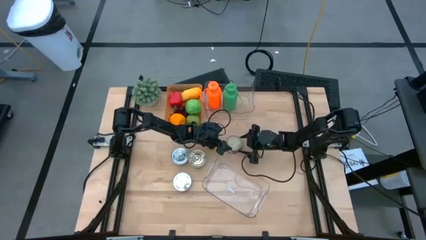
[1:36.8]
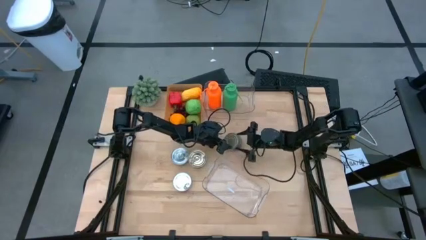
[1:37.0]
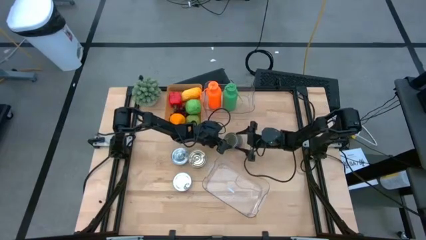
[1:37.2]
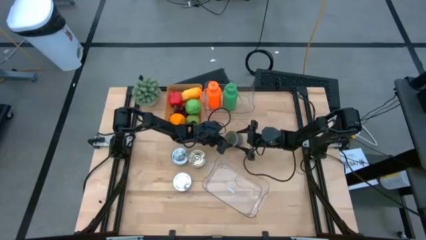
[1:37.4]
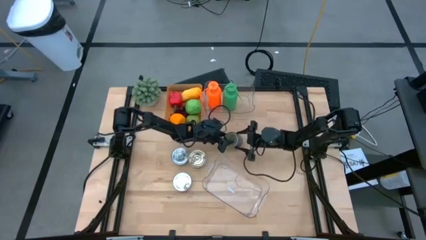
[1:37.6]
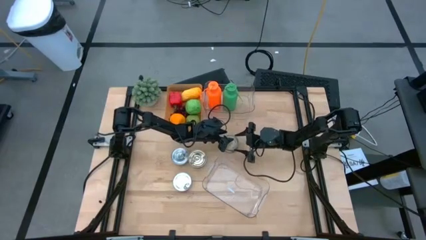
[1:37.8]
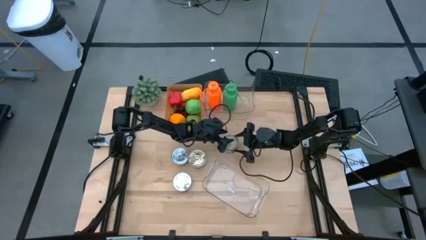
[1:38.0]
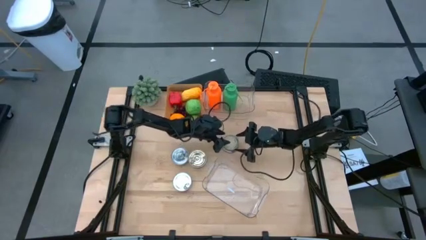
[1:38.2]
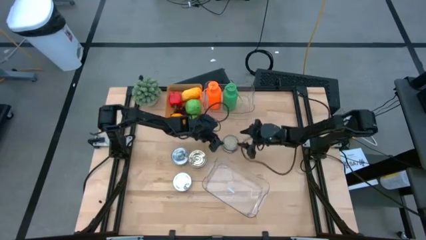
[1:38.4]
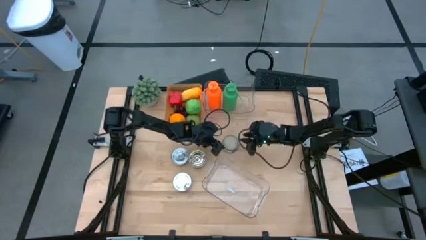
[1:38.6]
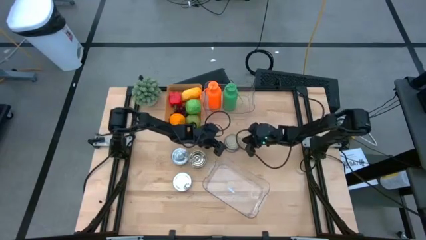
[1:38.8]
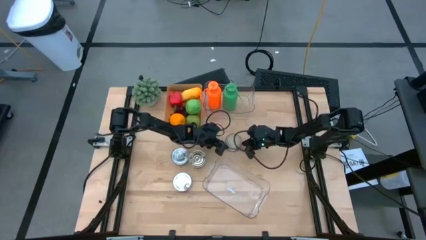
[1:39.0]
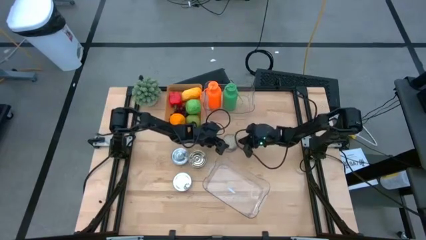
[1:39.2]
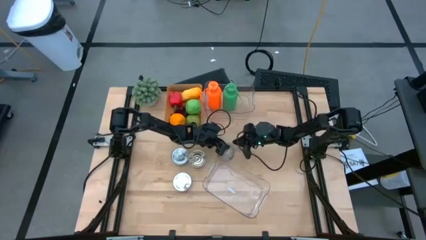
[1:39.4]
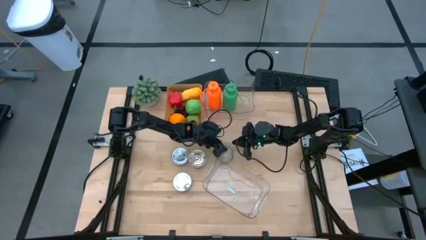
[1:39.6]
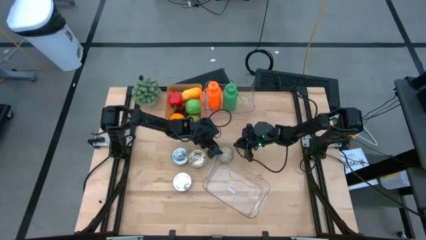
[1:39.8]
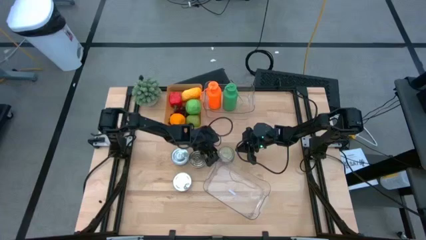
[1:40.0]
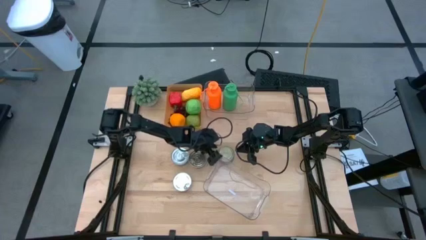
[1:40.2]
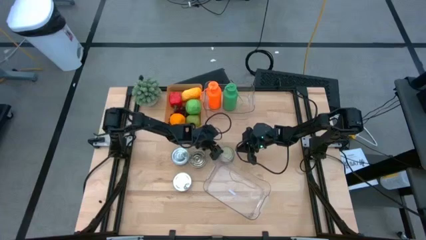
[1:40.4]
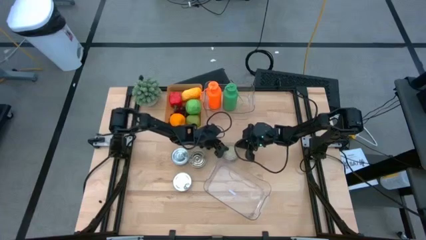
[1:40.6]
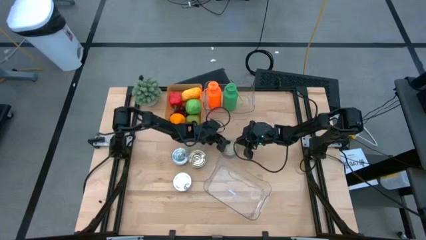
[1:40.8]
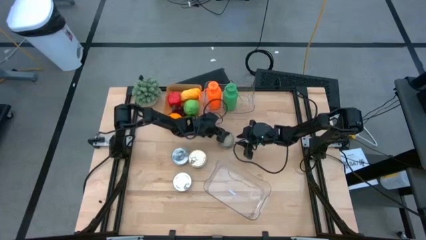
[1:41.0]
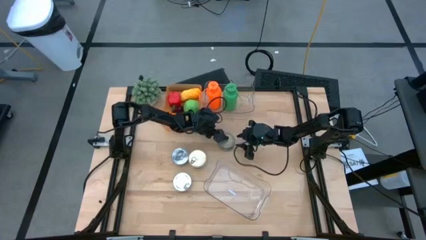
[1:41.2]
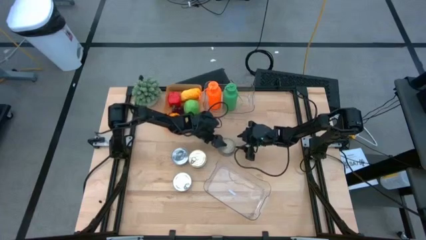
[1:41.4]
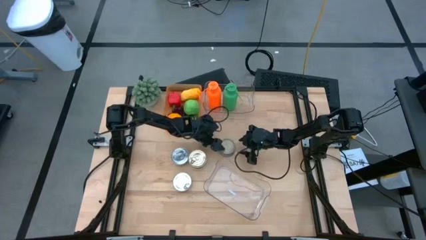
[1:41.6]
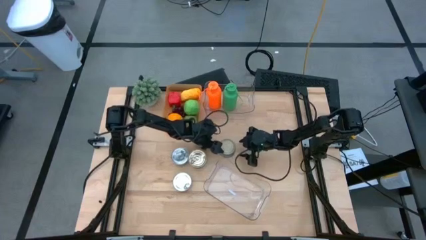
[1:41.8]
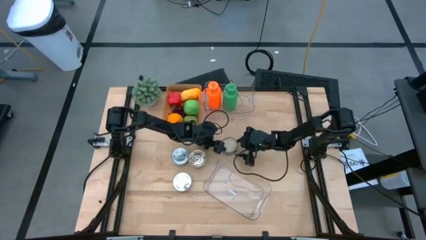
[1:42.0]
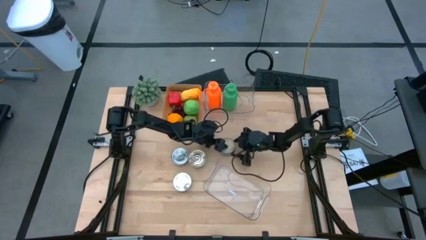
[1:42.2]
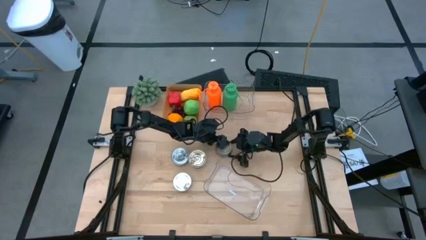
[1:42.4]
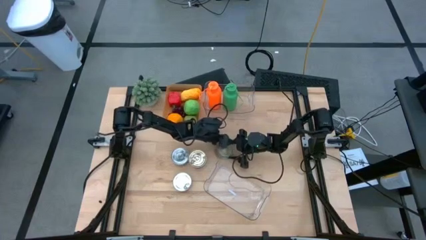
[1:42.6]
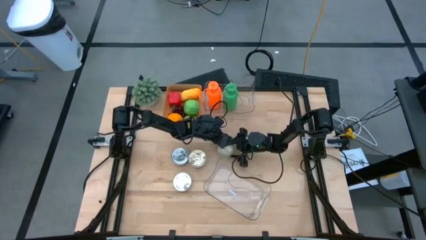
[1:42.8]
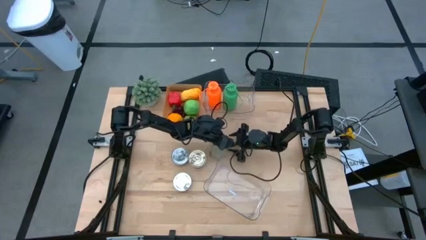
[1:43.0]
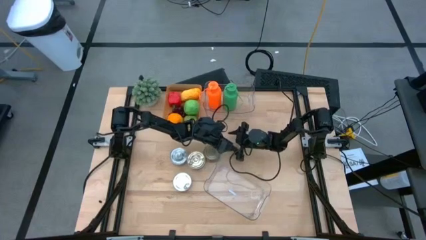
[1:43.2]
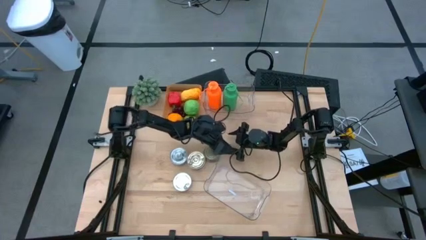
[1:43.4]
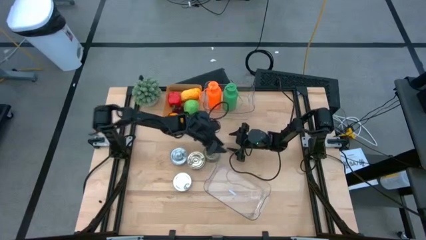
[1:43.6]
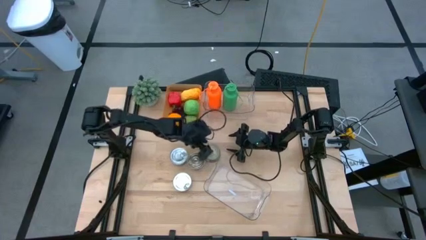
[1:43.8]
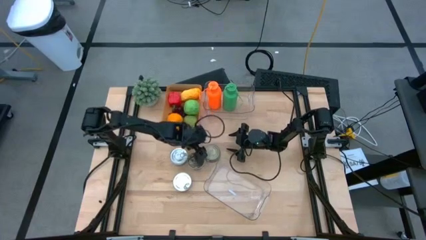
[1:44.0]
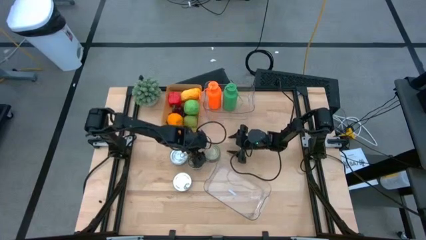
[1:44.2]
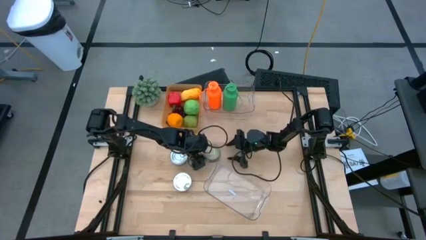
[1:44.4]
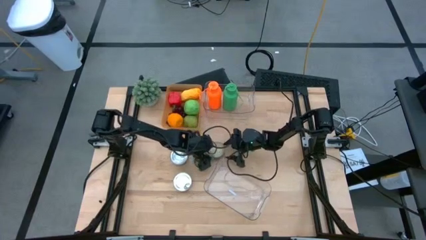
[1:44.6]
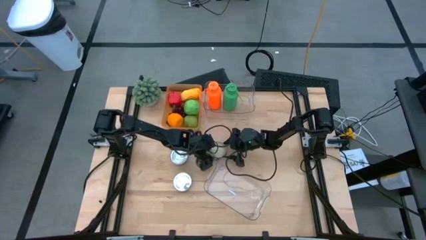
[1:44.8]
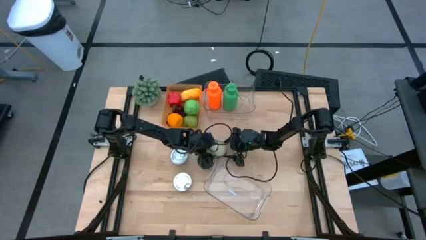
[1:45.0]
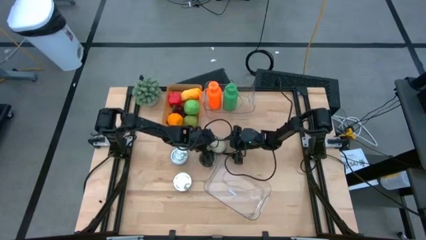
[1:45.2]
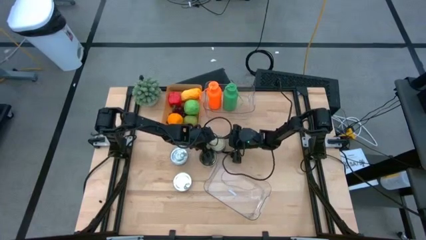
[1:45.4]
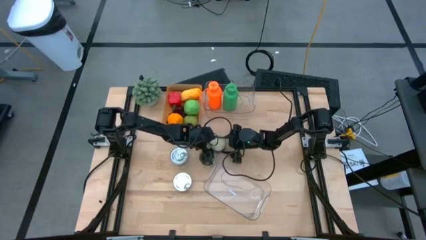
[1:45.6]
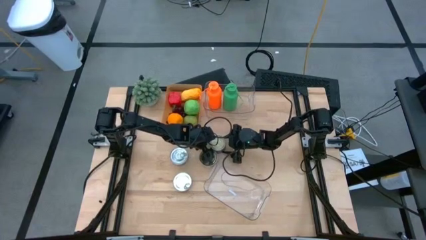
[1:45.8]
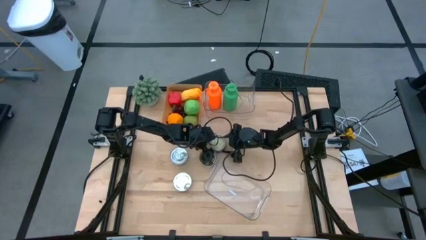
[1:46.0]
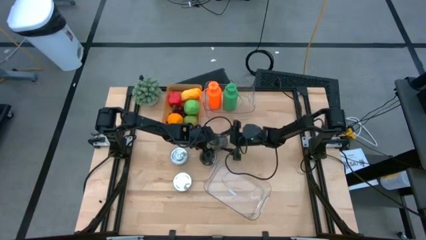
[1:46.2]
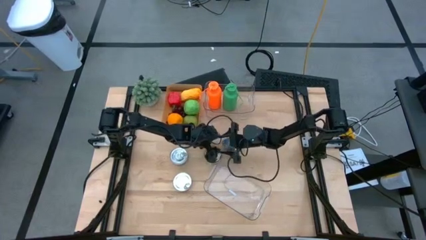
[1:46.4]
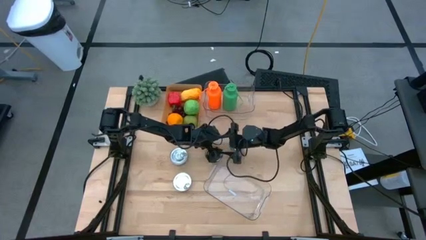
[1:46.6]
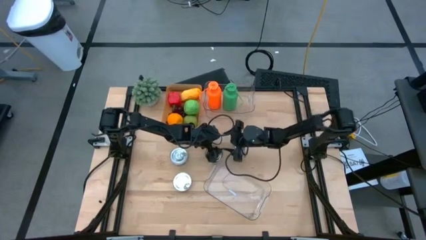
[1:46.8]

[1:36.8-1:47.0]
Task: Pick & Place Food Item
Put the right blue pink tuna can into the bottom transparent bin

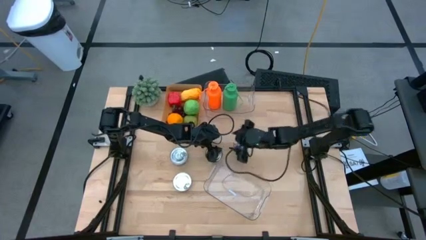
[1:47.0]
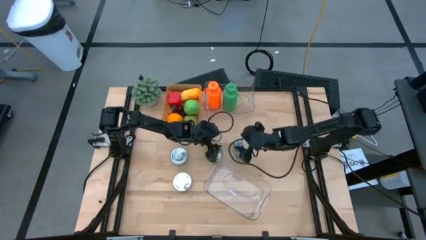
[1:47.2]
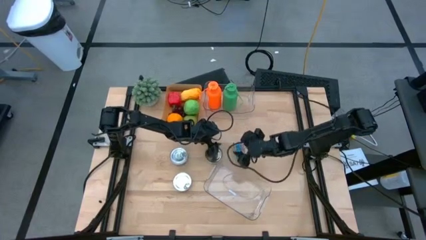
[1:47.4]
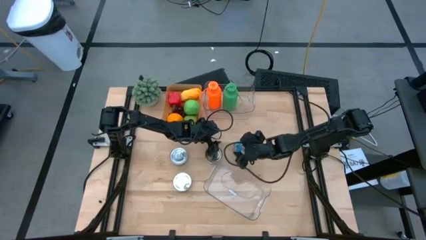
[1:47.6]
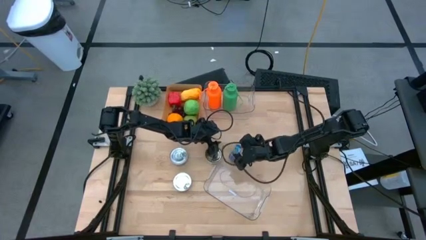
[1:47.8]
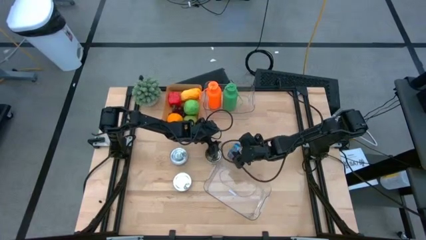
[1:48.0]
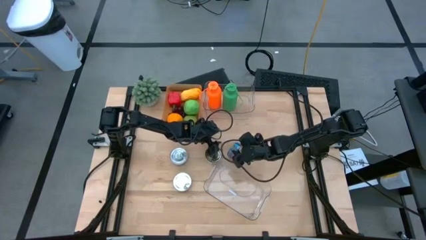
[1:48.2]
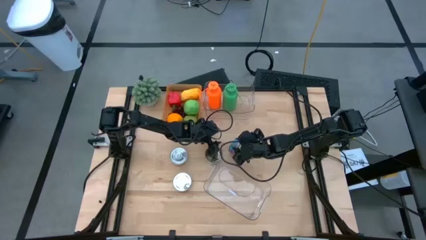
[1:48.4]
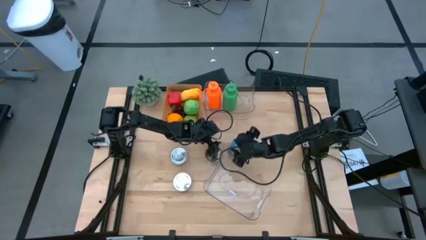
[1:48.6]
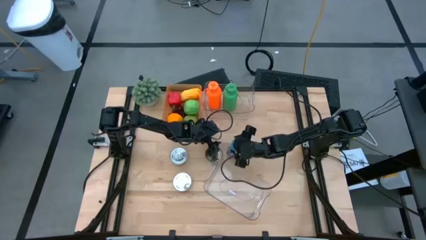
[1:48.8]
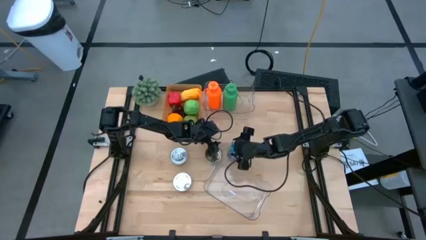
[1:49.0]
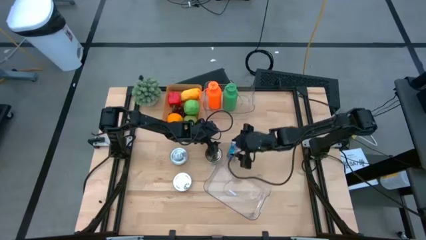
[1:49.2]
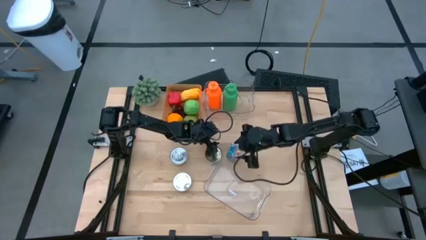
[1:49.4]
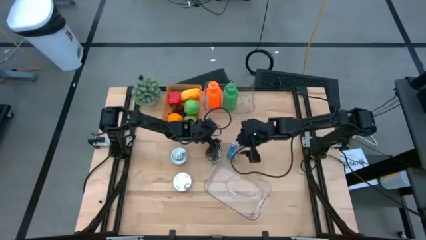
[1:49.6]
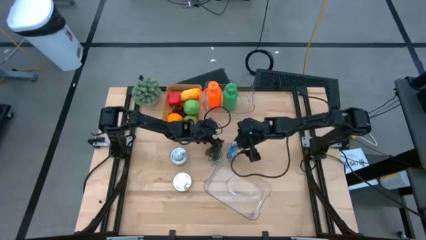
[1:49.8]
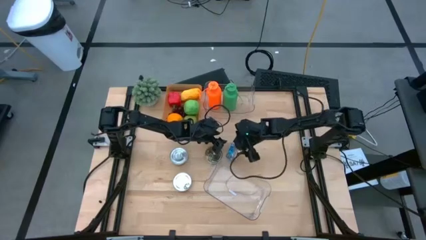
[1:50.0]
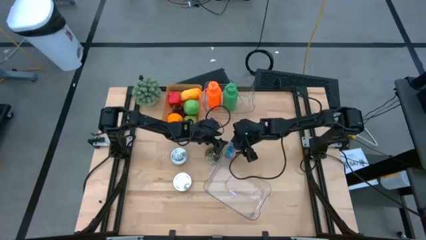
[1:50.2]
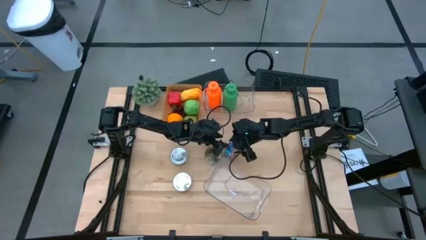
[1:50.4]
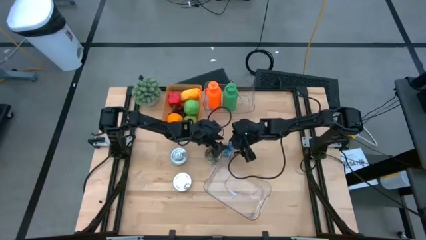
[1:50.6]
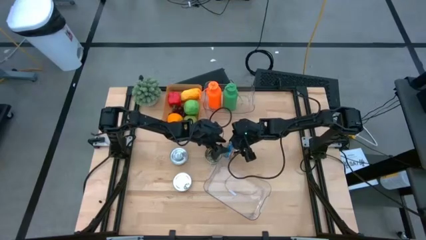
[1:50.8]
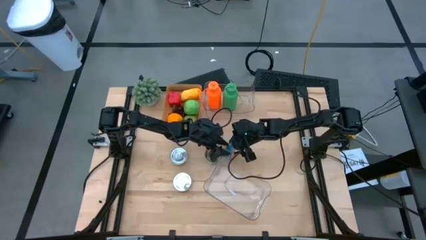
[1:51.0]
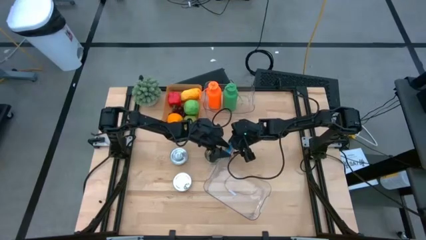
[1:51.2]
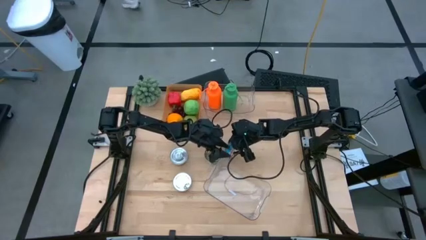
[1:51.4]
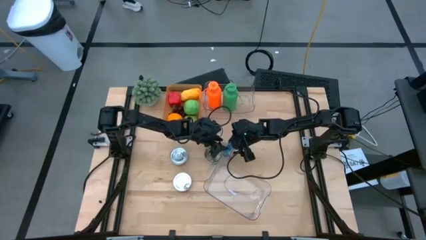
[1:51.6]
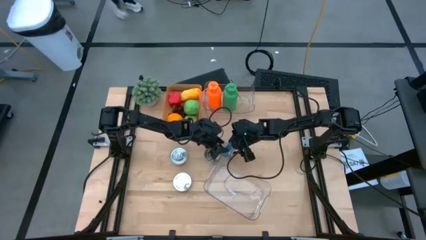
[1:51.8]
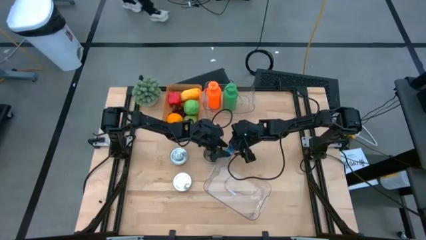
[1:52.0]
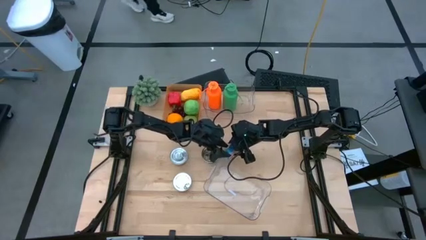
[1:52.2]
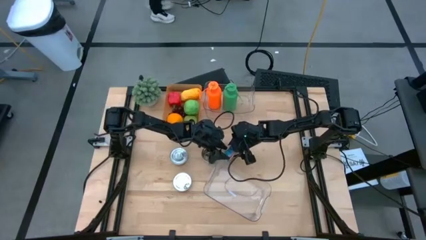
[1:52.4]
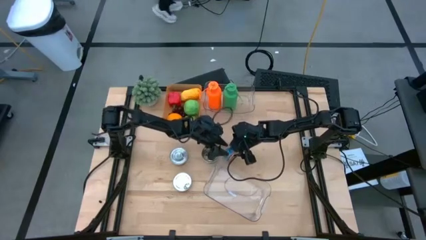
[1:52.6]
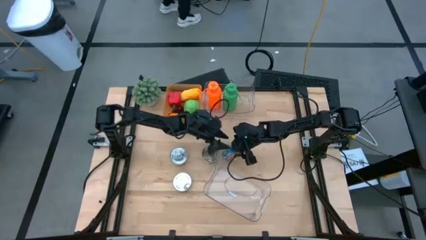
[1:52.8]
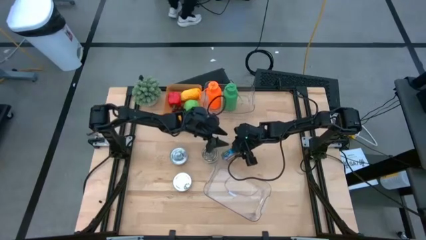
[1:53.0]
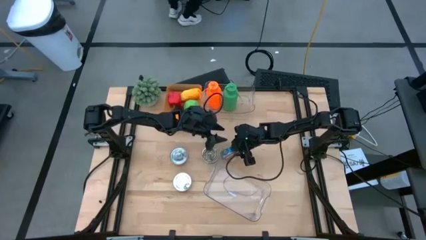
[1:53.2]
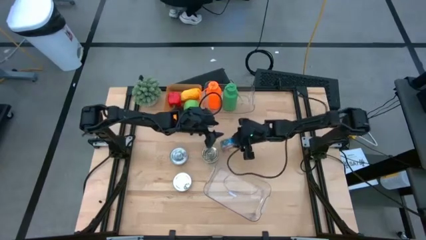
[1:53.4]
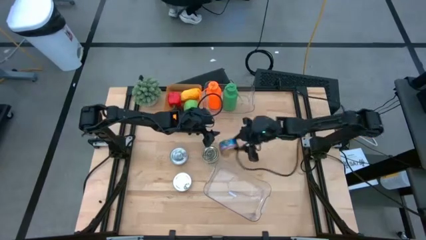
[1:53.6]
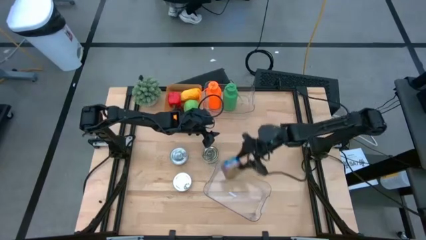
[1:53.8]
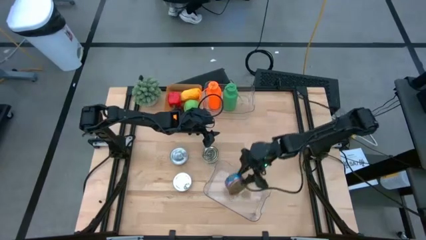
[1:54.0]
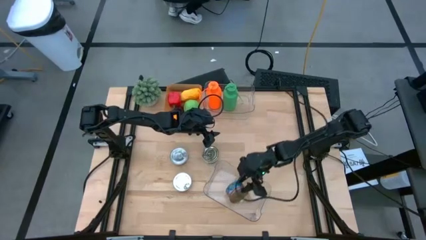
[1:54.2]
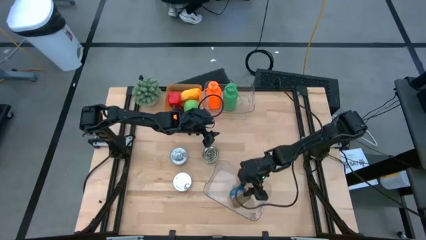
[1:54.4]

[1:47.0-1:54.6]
Put the right blue pink tuna can into the bottom transparent bin
